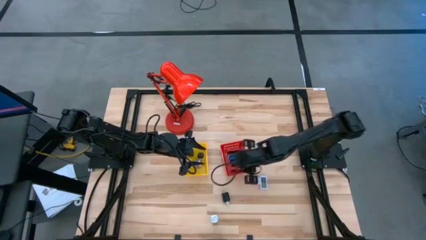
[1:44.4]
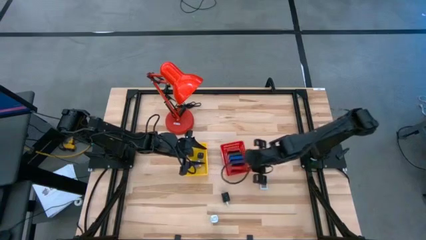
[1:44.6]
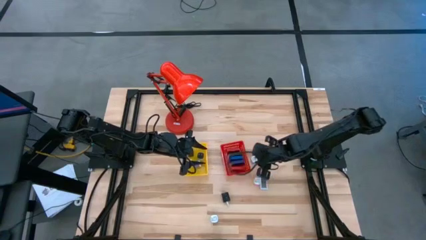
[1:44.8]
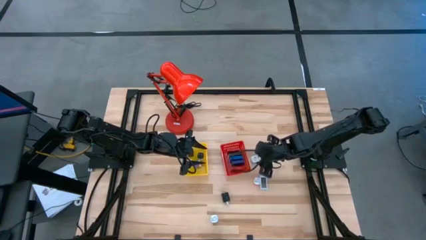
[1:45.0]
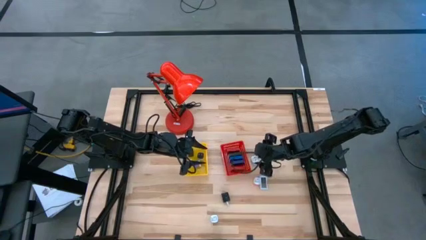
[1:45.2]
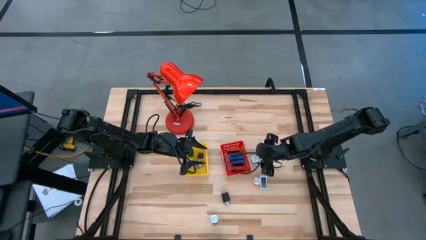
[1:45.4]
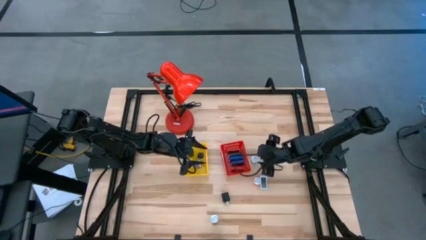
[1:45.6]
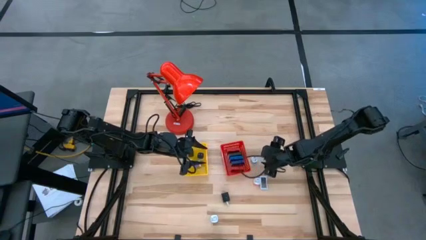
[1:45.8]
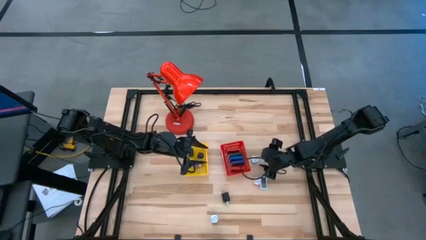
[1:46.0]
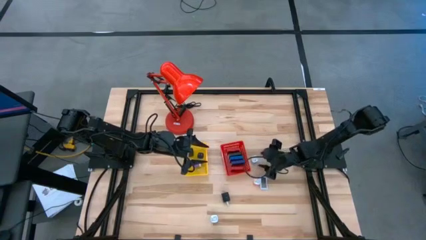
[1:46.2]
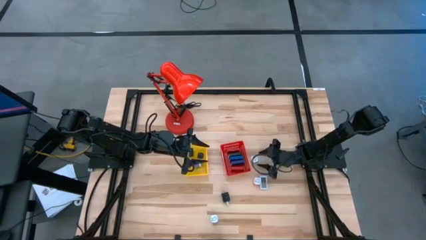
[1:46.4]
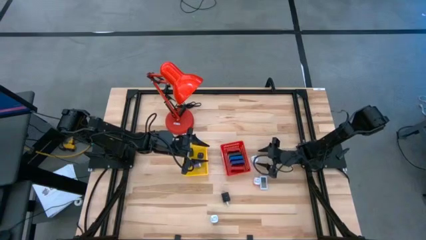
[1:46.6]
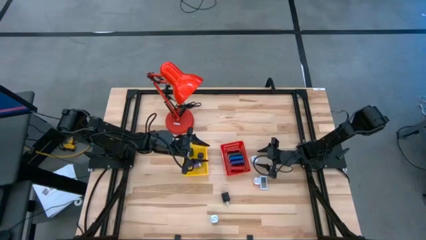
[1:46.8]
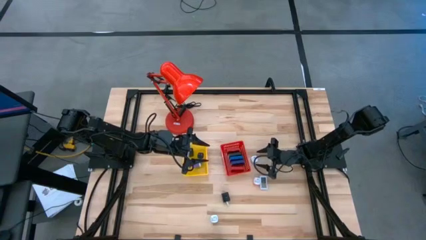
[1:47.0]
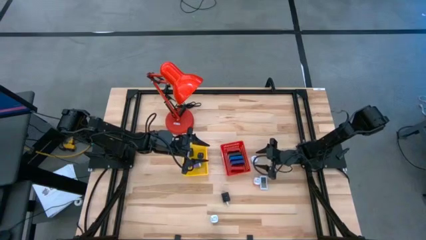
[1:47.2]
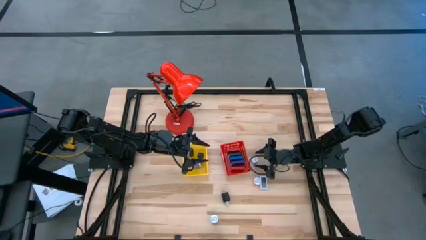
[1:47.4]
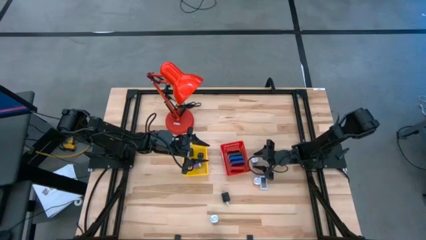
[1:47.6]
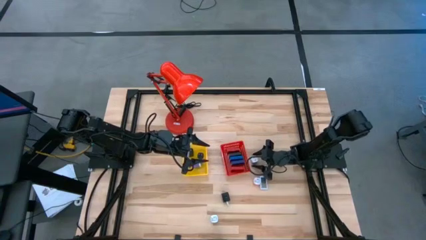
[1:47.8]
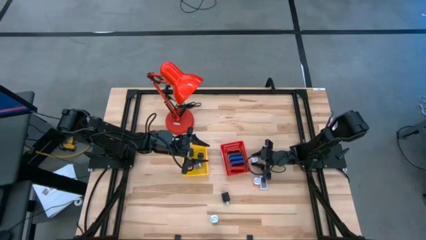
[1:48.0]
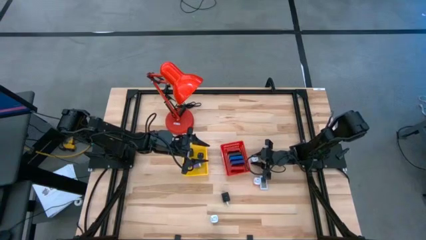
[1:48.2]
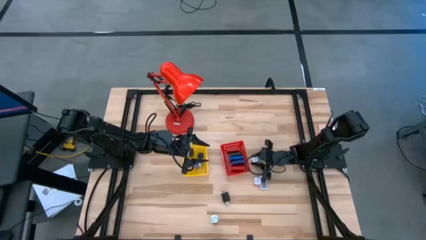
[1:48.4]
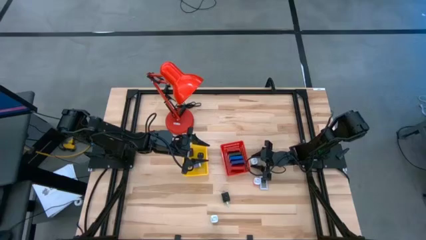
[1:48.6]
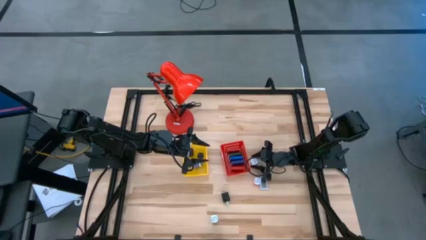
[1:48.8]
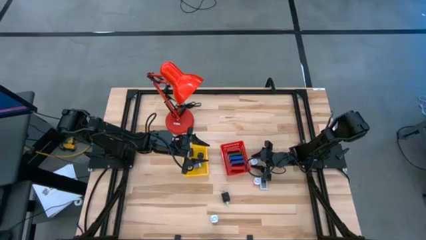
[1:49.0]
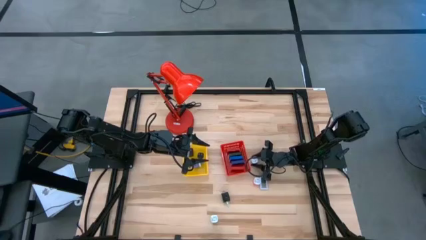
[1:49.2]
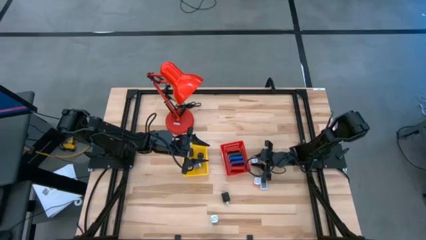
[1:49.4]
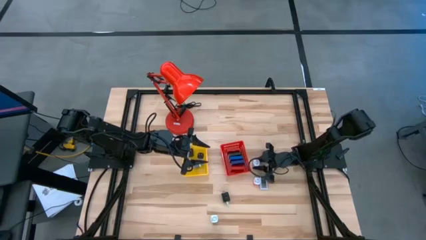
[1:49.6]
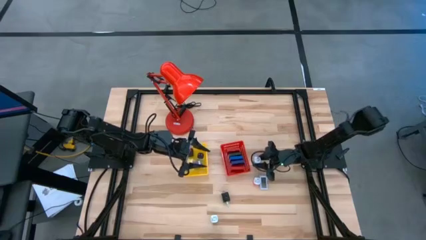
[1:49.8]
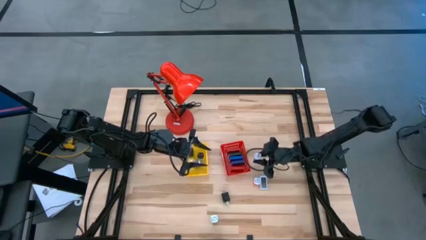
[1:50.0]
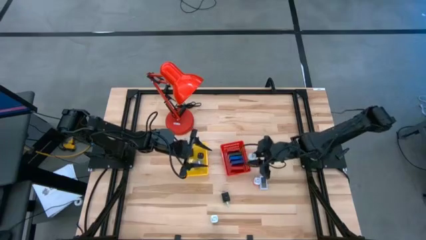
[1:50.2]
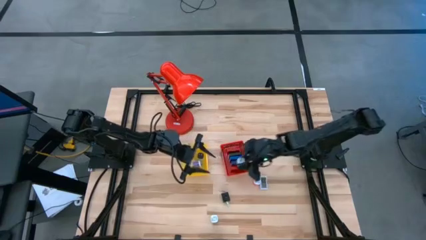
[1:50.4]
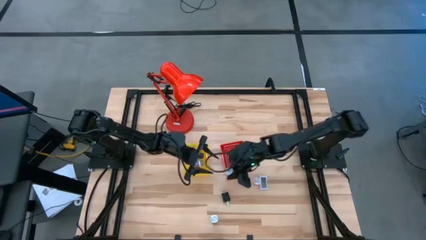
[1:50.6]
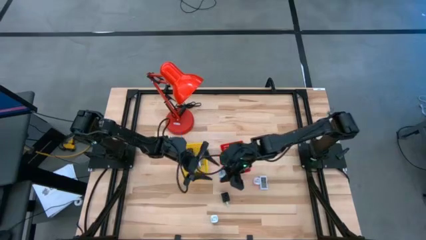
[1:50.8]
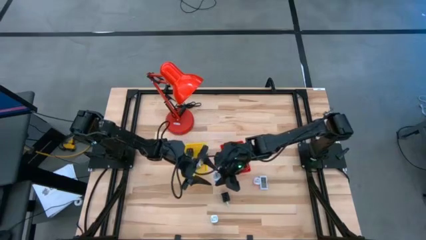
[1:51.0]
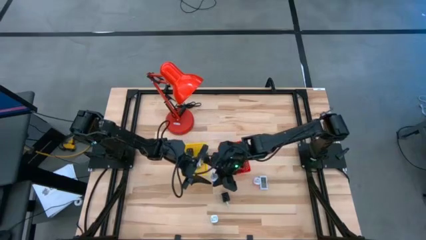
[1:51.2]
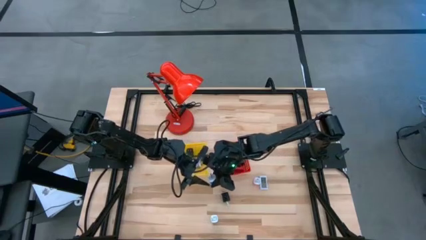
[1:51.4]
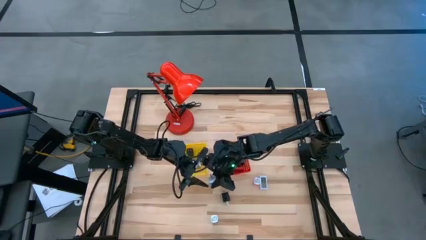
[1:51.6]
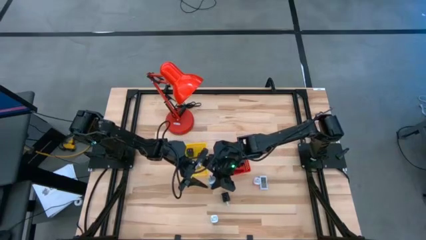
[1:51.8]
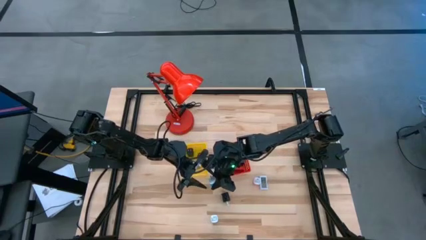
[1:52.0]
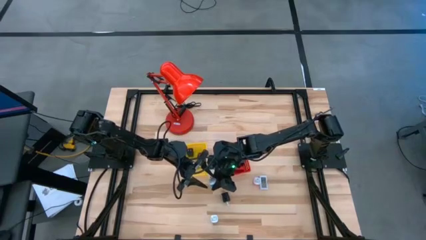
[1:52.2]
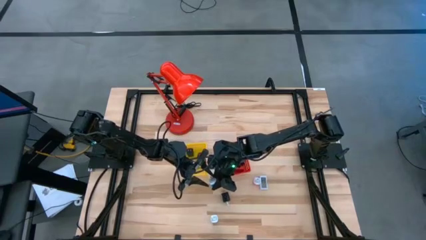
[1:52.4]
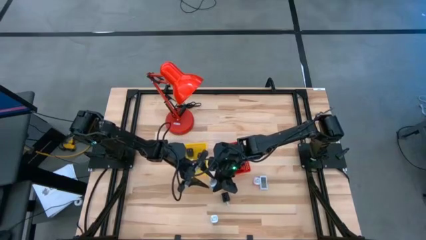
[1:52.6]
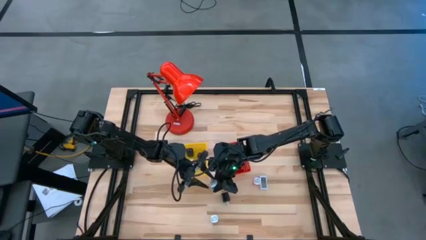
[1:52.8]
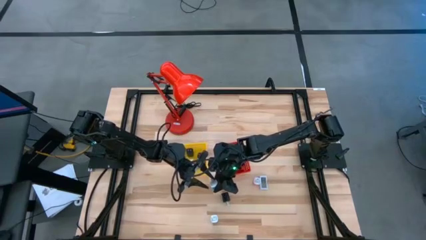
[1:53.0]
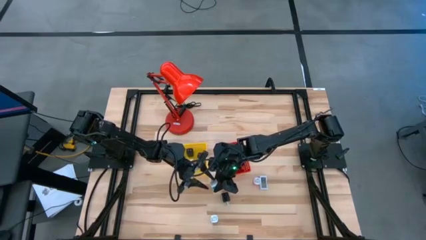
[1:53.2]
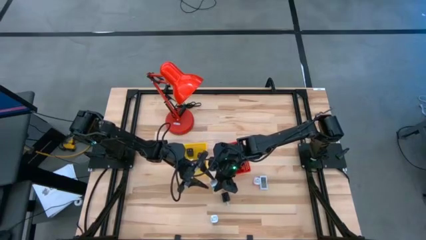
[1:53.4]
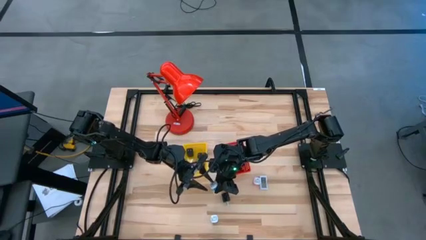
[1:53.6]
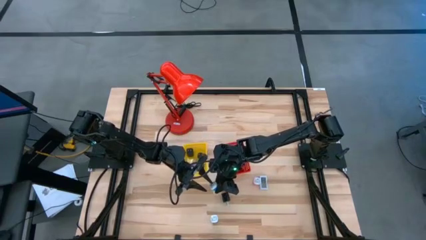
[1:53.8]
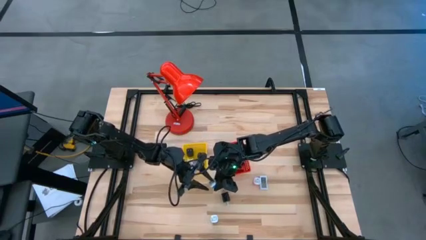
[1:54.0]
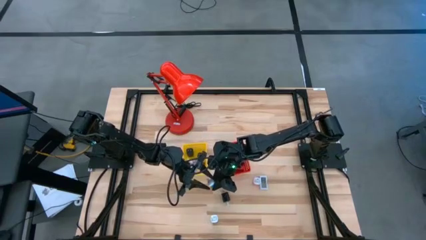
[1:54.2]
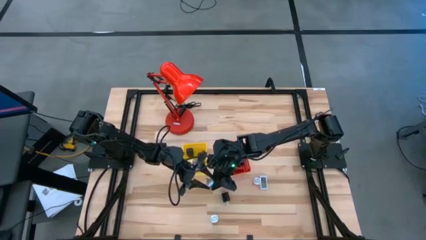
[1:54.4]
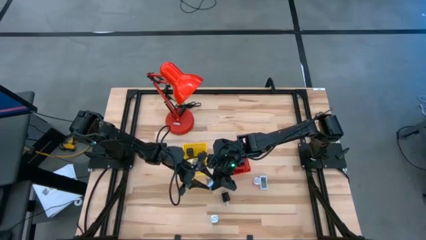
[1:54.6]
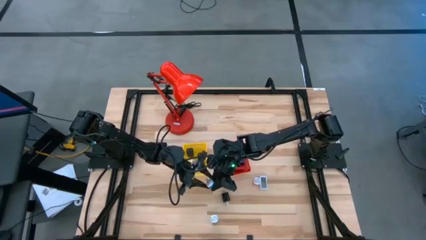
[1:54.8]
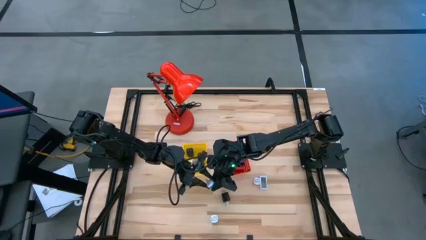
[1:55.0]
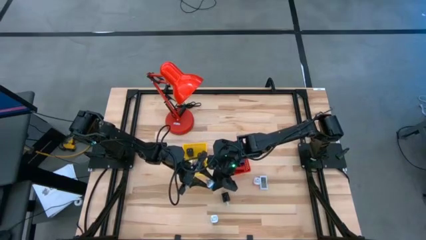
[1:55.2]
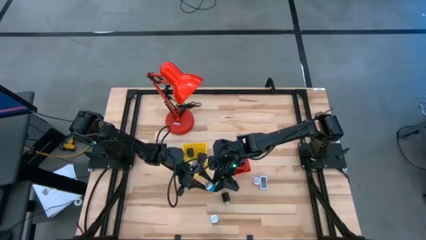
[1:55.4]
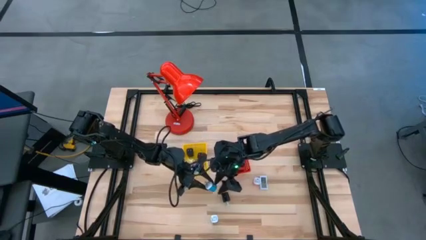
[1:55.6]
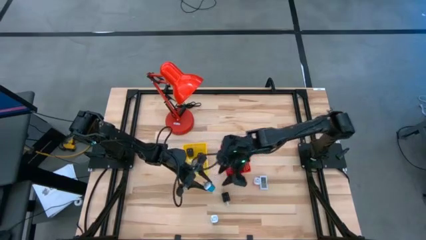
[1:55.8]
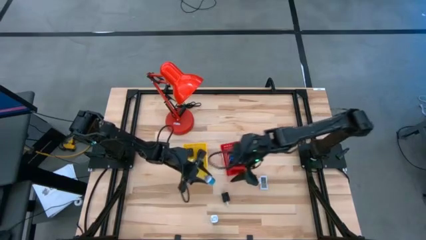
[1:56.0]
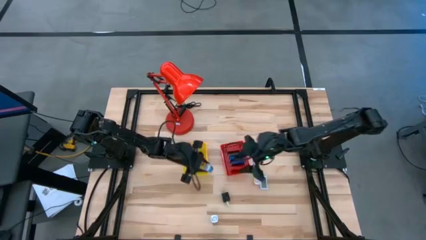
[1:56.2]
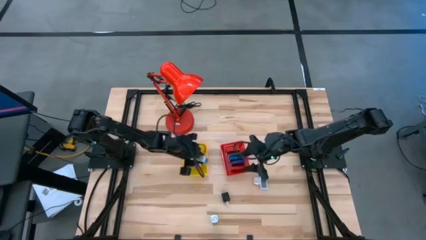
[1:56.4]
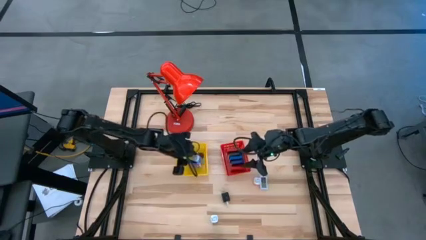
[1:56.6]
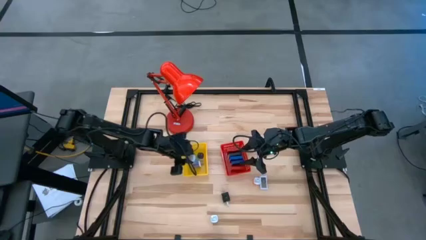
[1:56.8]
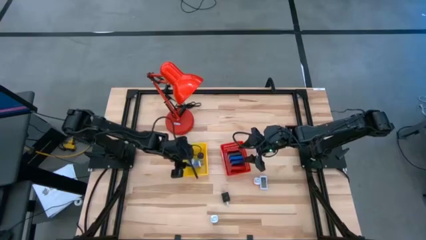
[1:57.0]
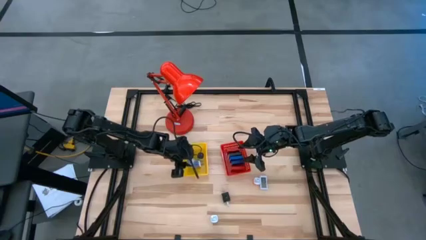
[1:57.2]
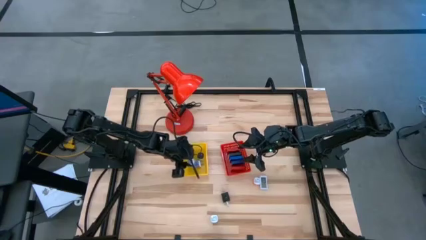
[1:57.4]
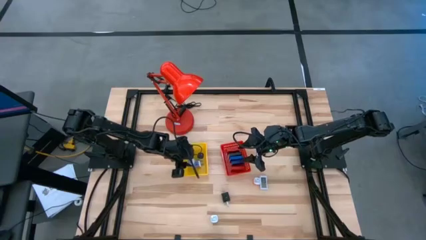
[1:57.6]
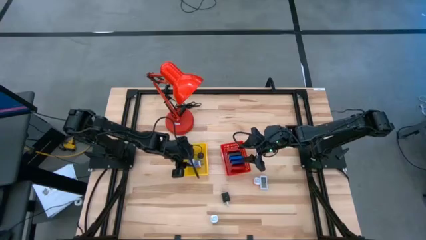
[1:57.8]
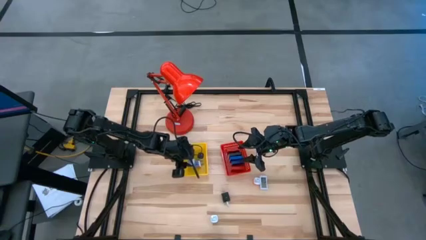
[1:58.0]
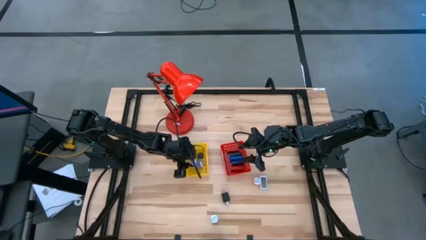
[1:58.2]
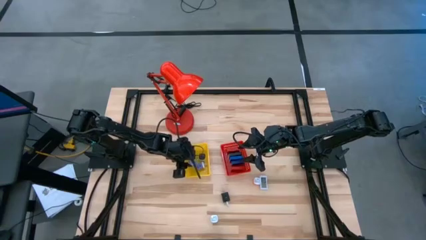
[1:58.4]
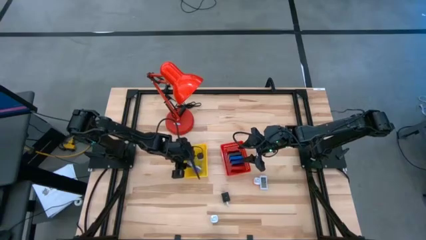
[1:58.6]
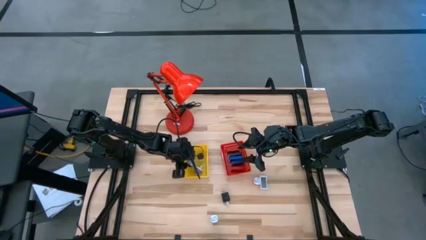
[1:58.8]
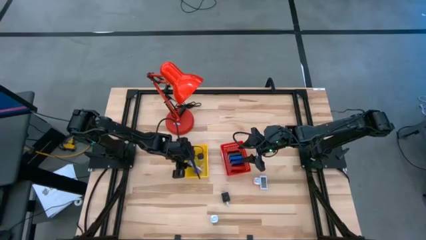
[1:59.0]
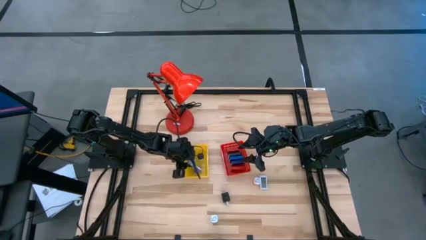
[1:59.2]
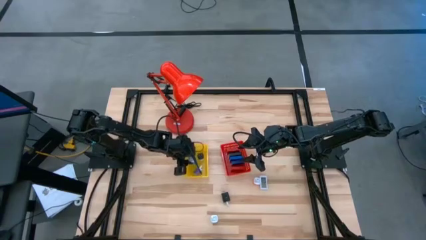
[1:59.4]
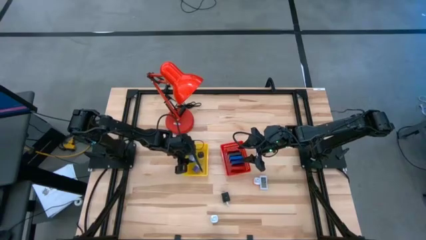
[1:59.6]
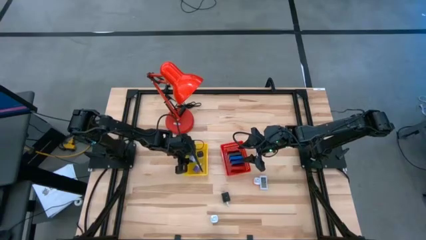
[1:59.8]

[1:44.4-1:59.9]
Task: Pick & Place Office items
Put the top light blue charger adapter into the yellow bin
